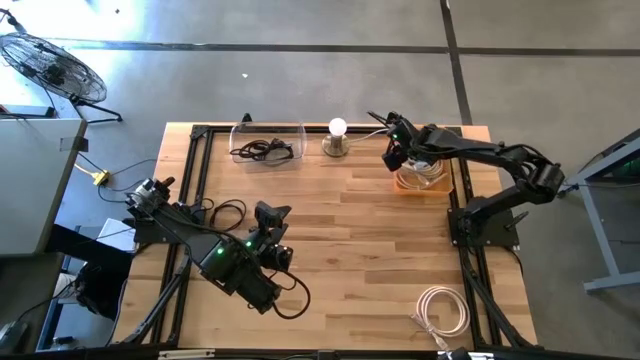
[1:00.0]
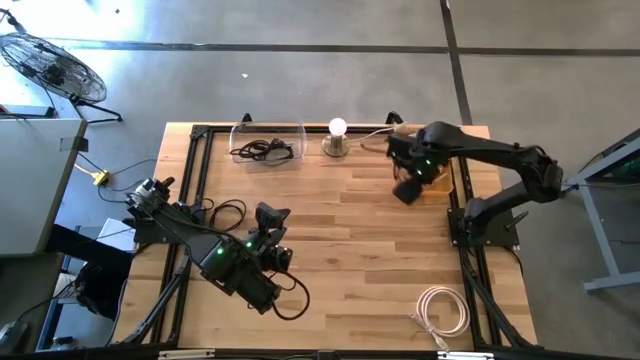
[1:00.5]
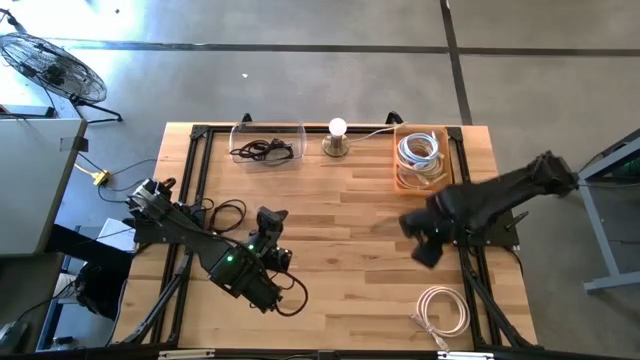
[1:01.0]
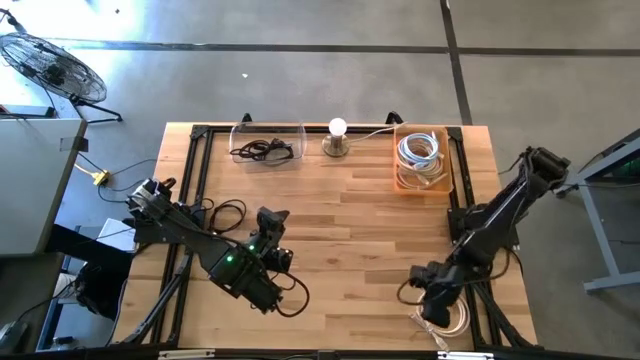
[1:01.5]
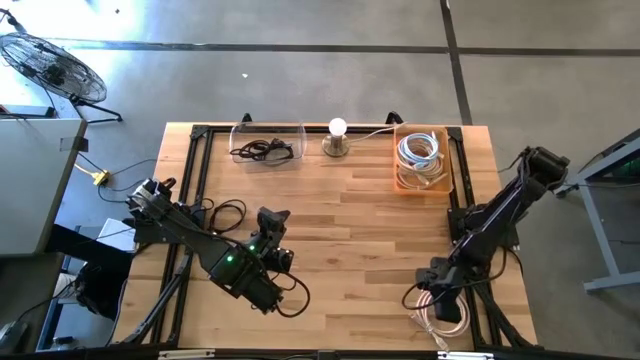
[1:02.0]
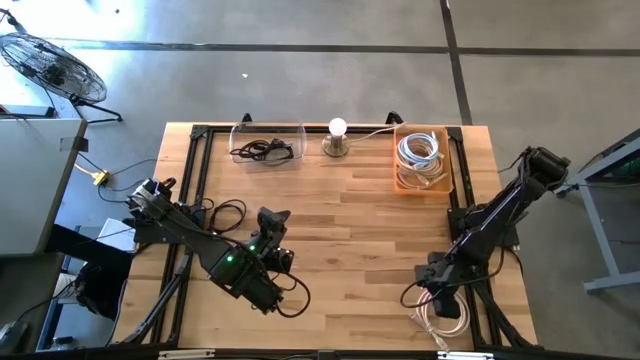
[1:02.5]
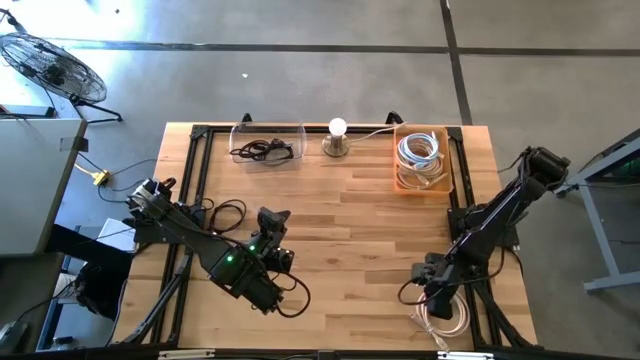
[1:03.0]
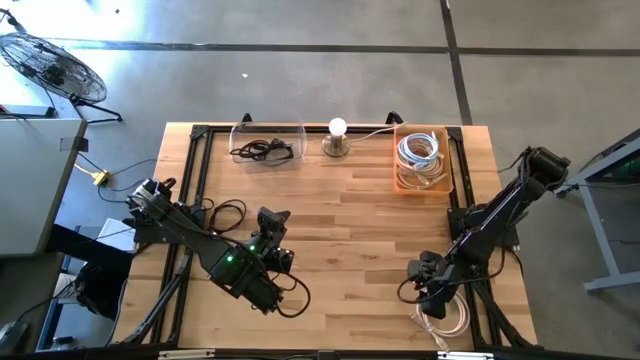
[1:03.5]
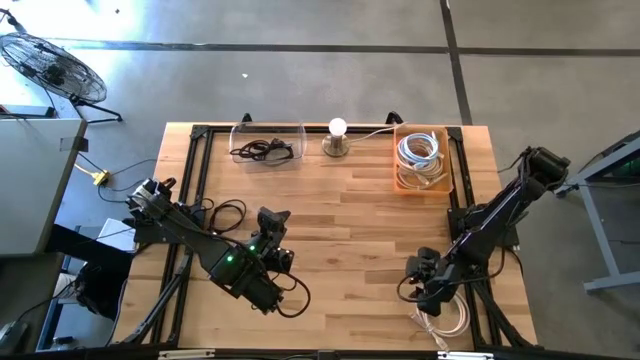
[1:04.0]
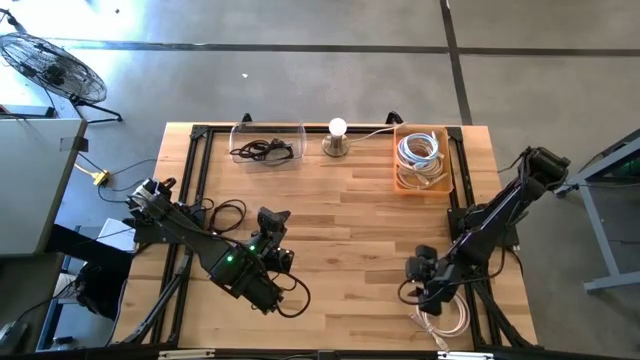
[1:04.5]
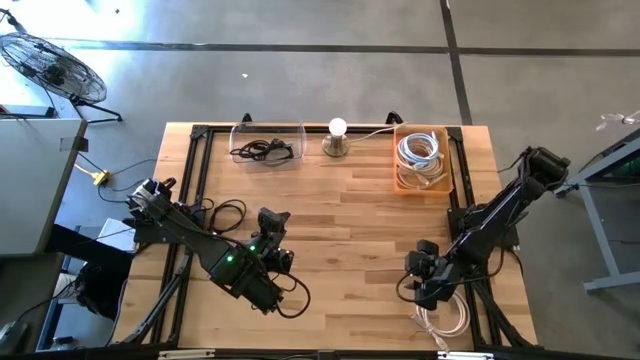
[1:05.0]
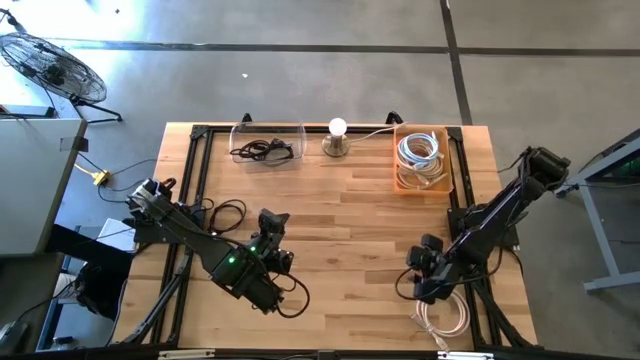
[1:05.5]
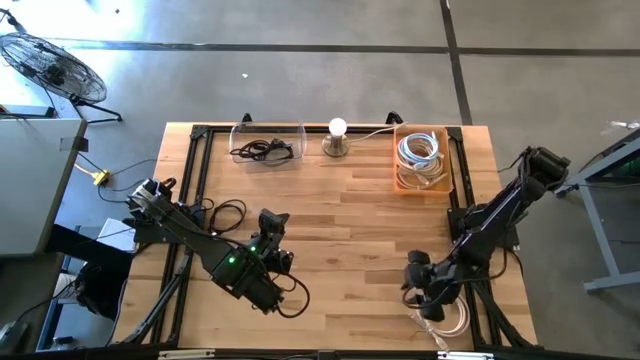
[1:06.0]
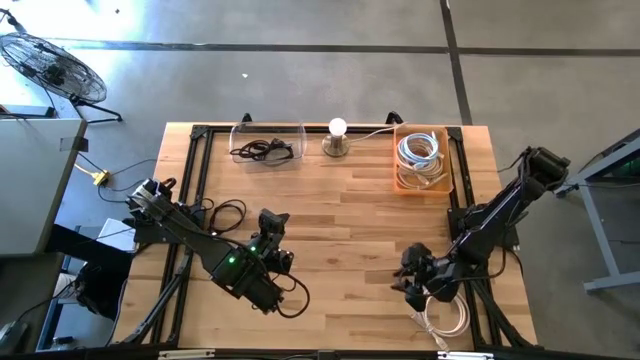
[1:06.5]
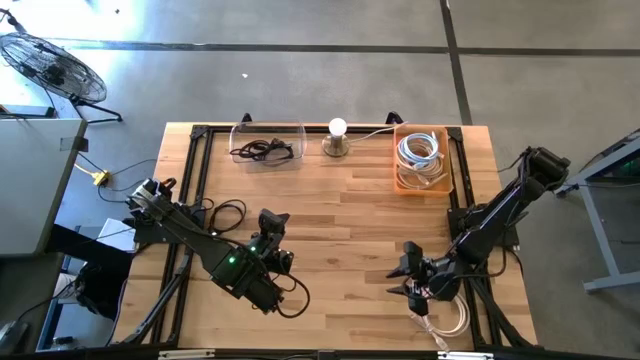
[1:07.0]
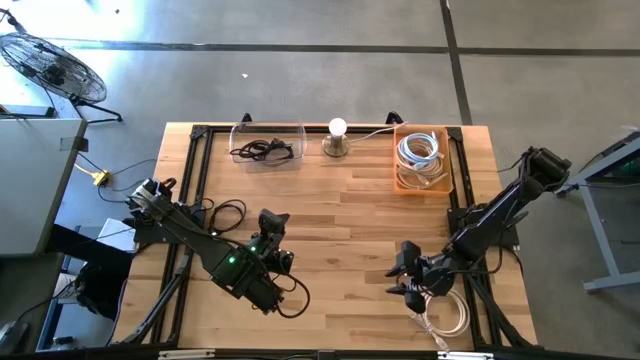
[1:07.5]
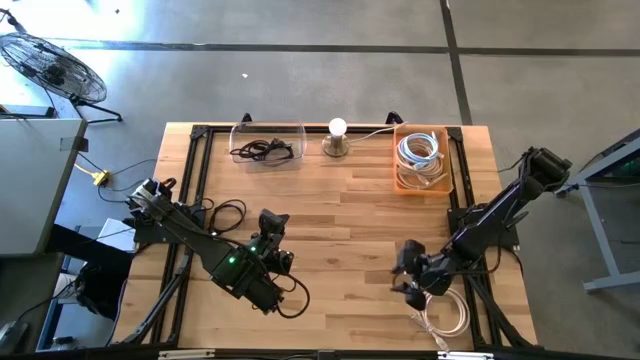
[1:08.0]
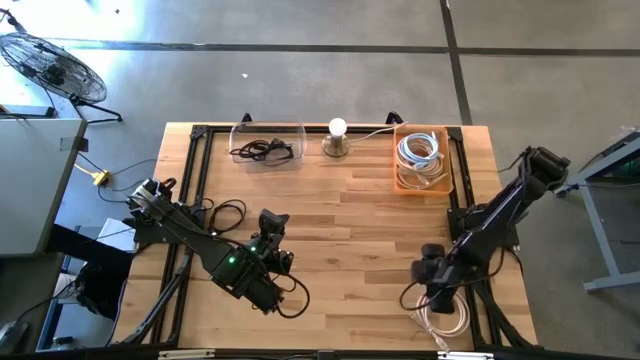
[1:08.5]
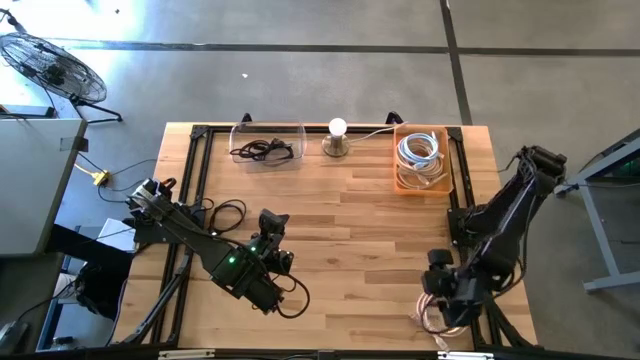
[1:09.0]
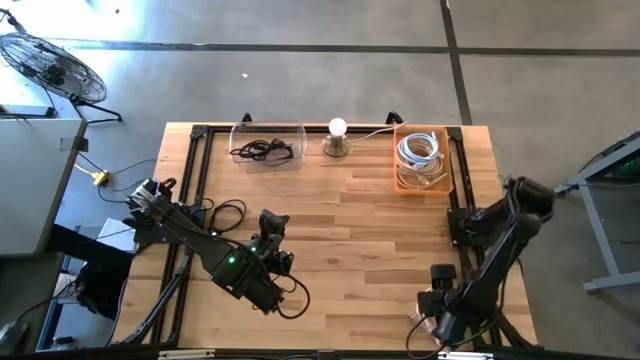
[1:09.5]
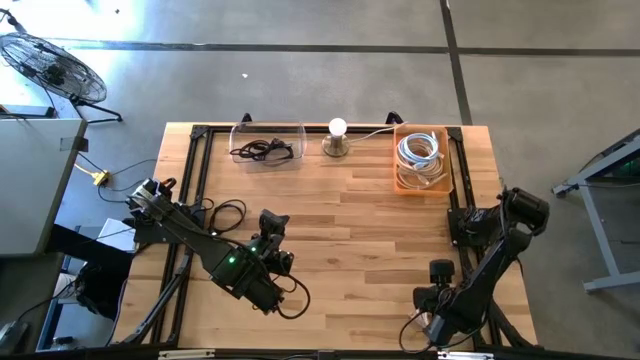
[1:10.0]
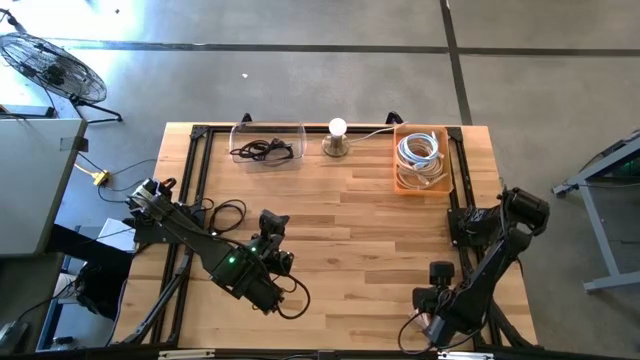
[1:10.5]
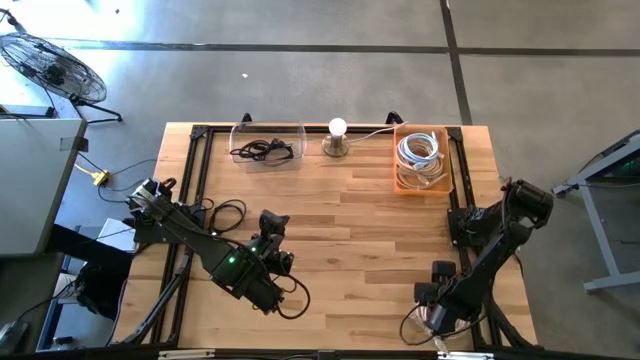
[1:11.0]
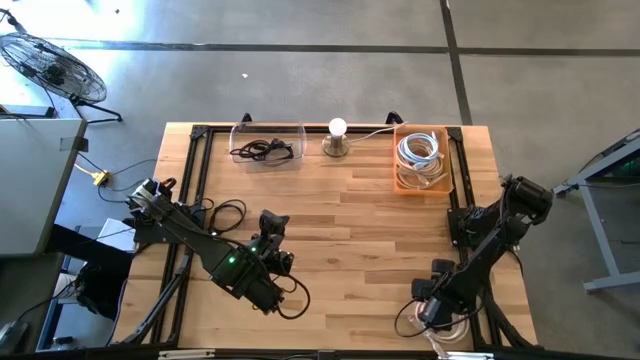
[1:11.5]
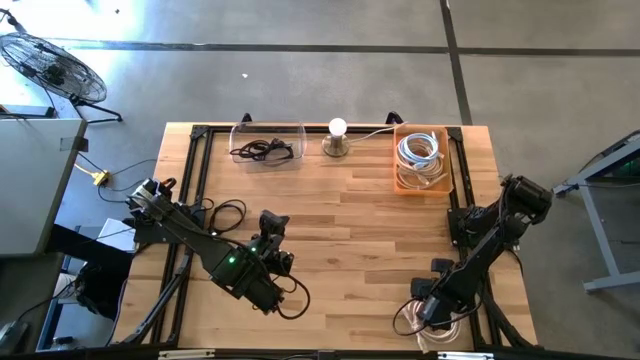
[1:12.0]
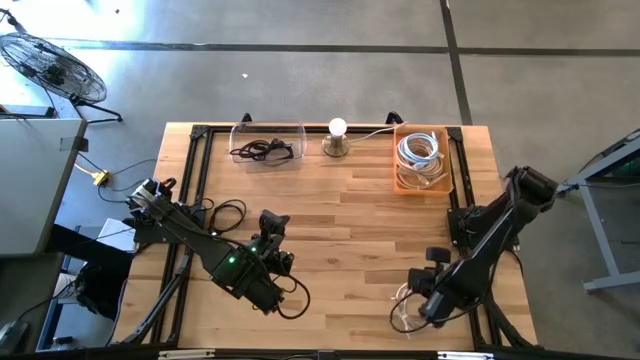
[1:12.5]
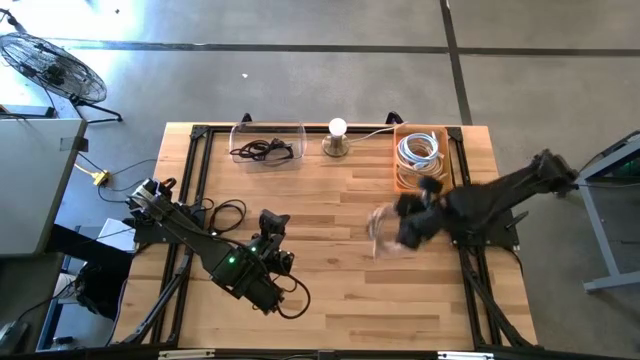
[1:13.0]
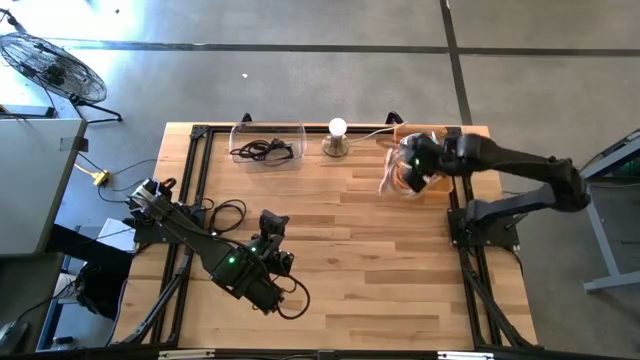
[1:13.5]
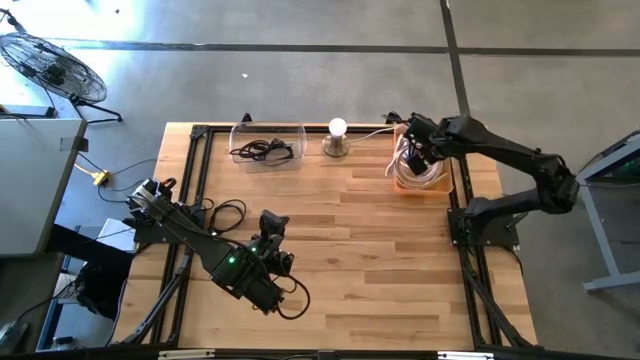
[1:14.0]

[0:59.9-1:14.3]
Task: Pick & Place USB Port
Put the white HDMI cable into the orange bin

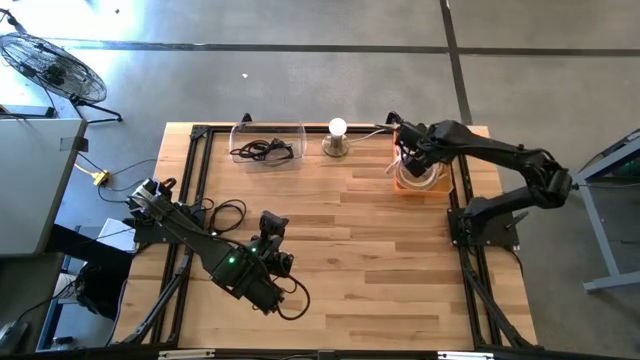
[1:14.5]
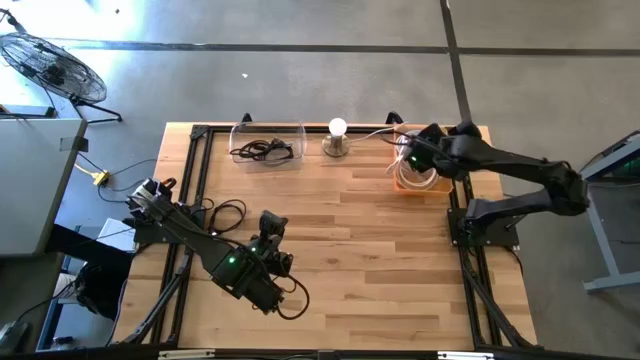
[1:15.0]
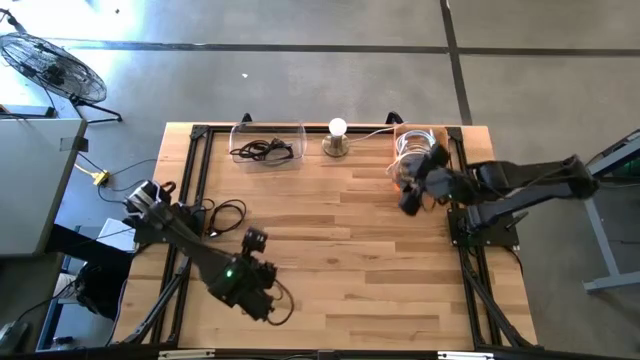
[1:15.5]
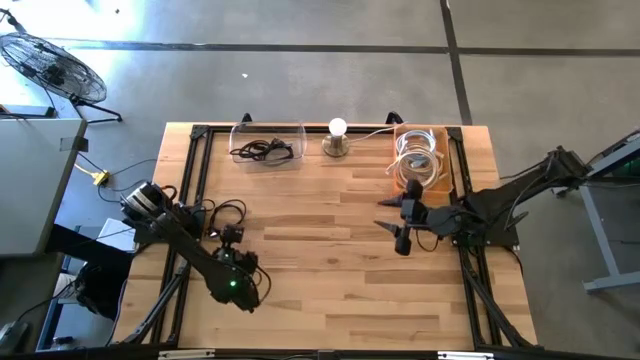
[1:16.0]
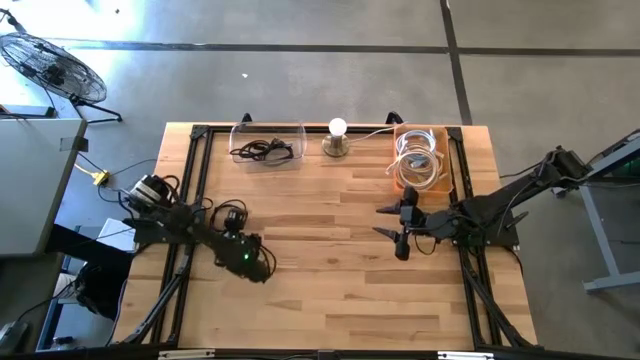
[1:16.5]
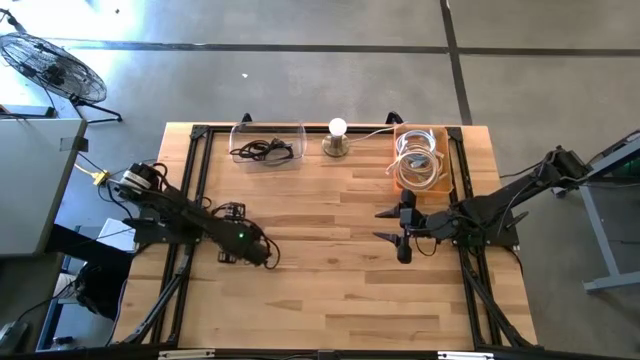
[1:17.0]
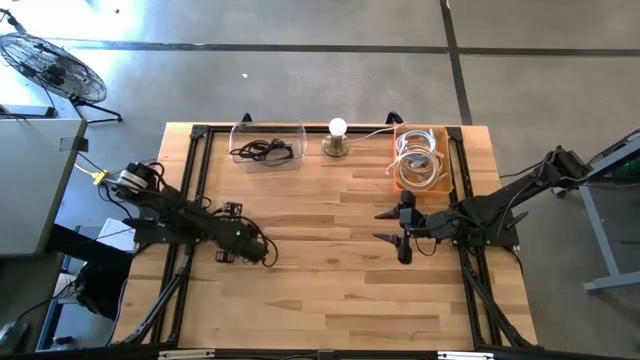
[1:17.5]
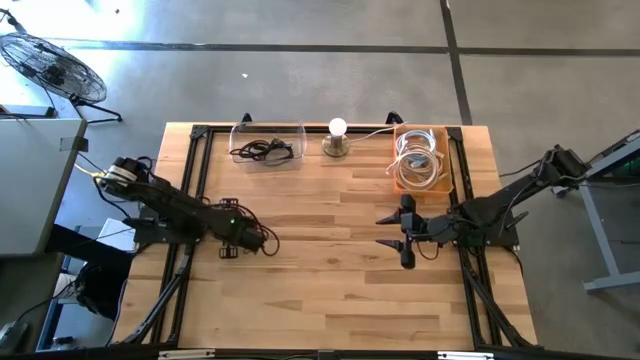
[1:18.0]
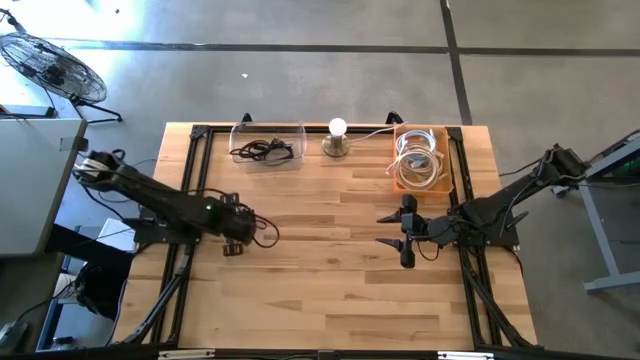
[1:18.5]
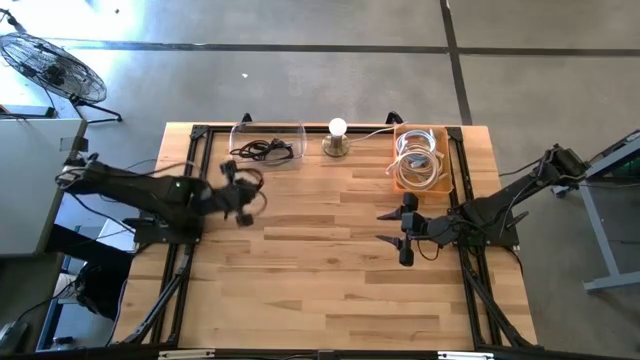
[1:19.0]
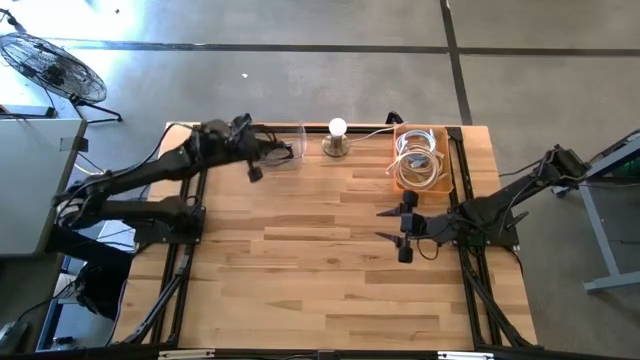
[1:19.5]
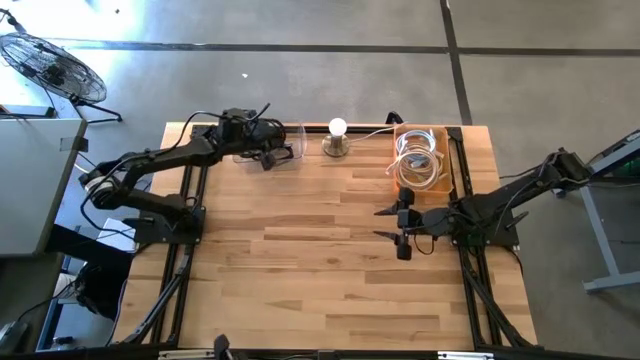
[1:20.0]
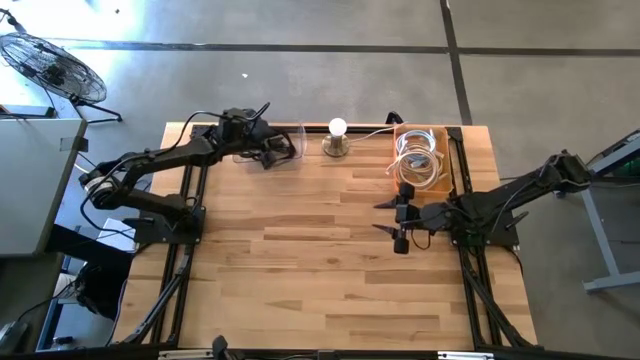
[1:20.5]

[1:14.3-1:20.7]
Put the black USB cable into the transparent bin
